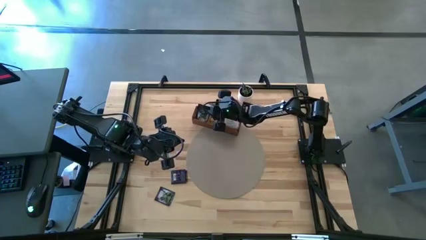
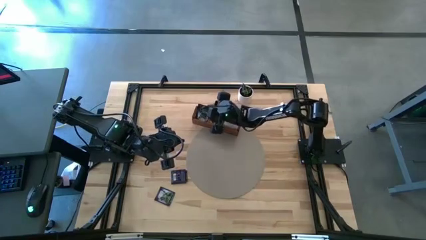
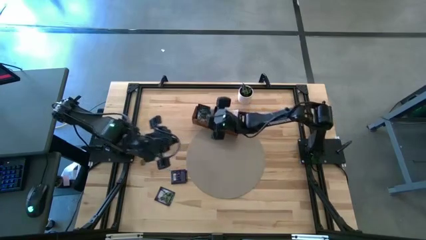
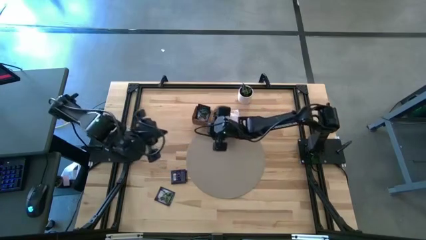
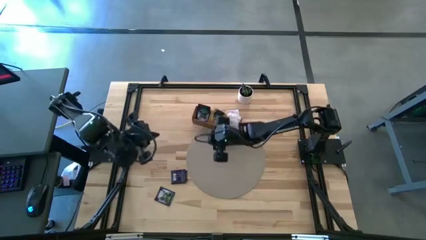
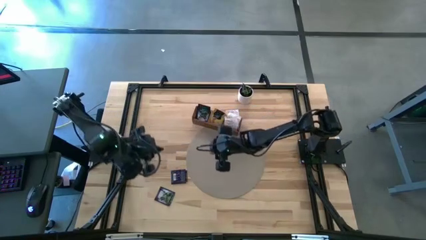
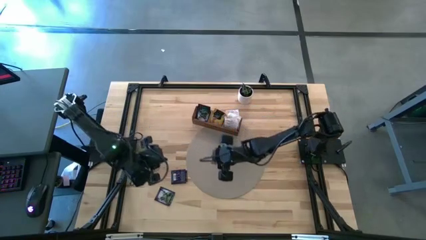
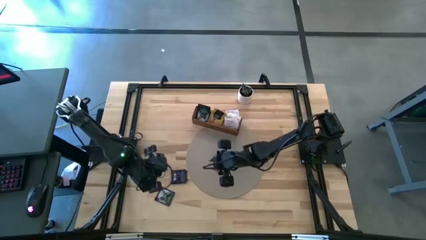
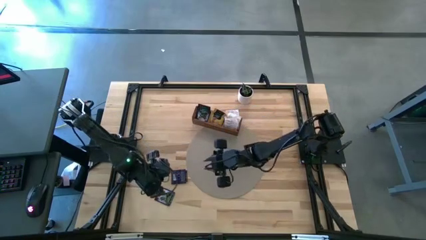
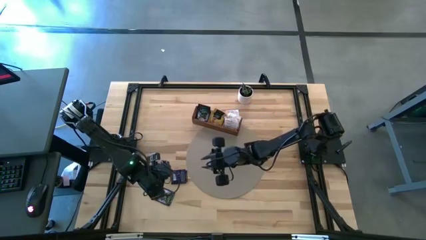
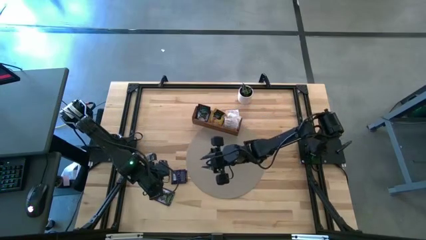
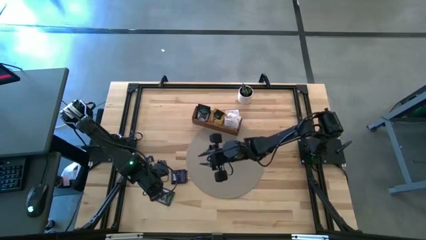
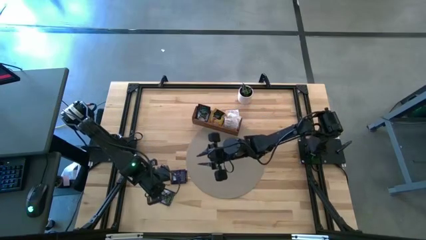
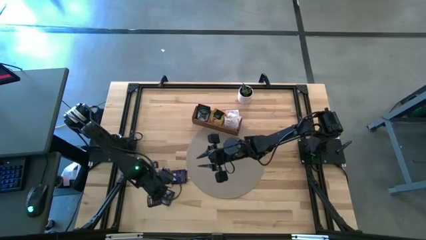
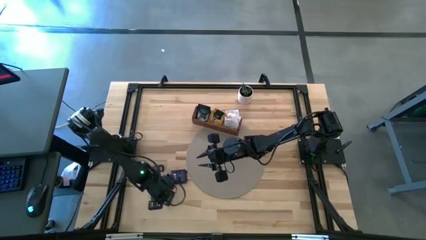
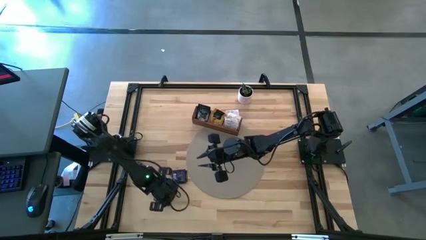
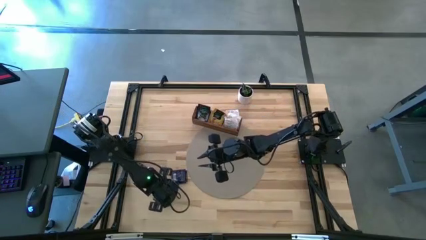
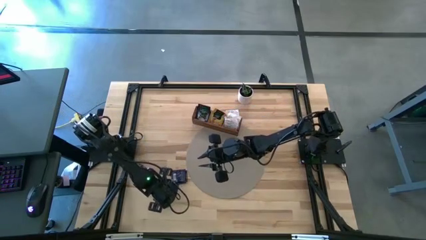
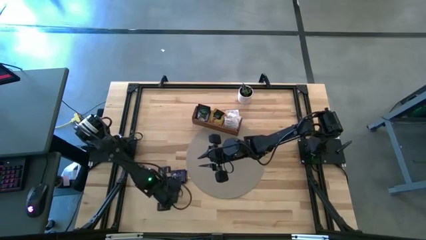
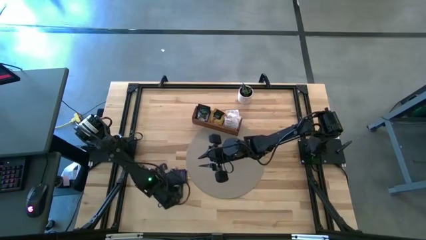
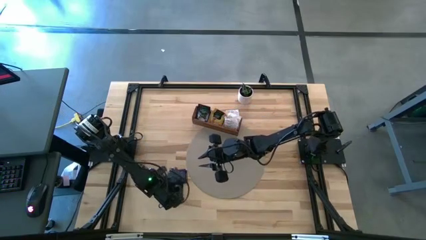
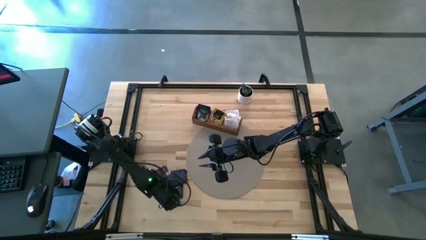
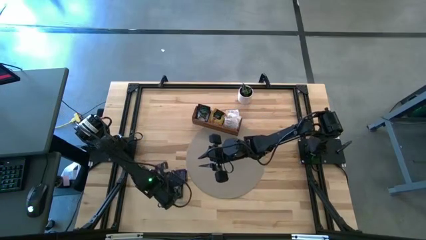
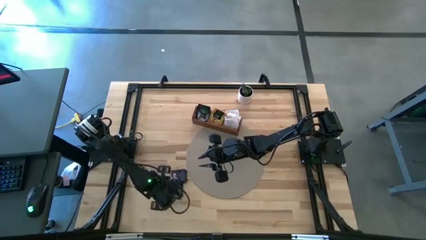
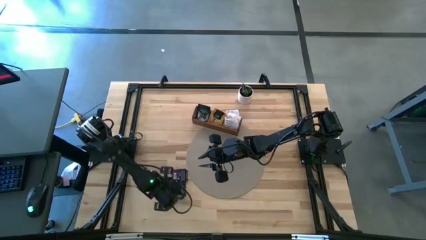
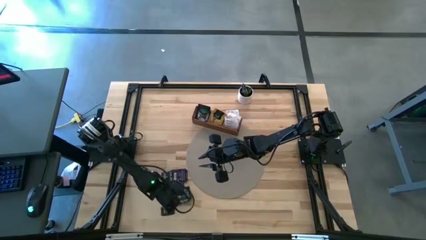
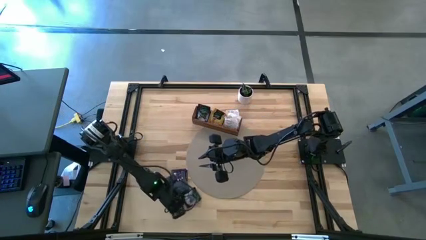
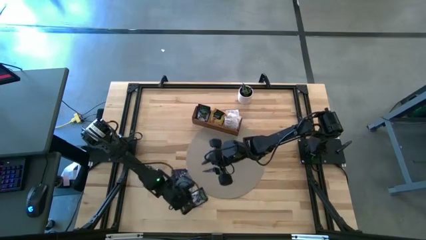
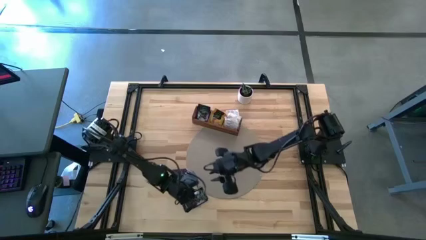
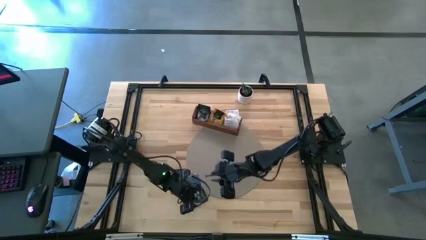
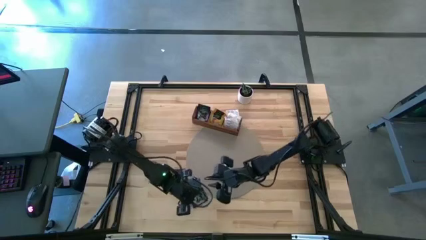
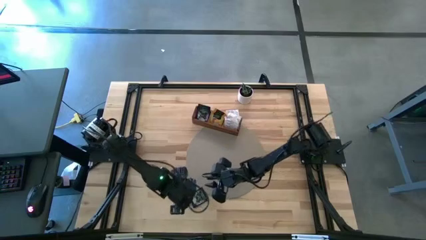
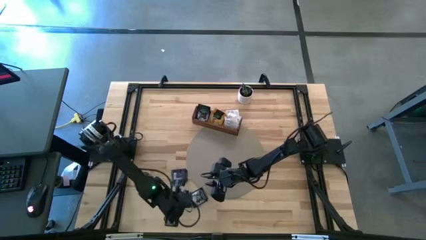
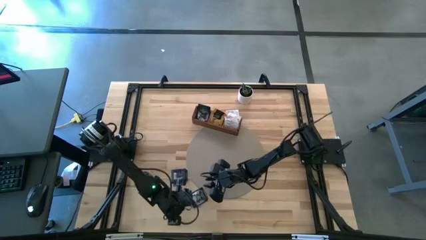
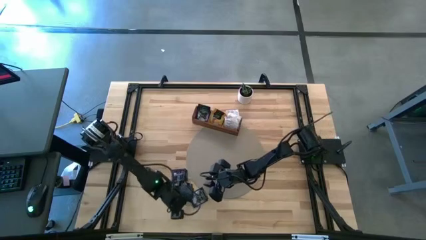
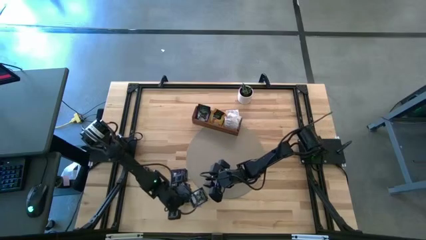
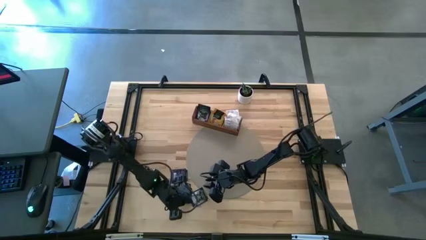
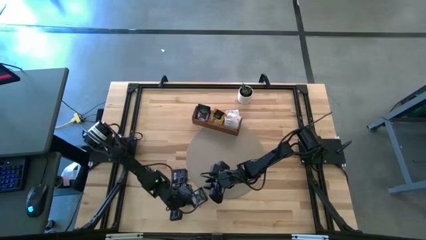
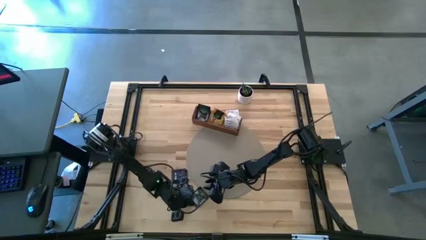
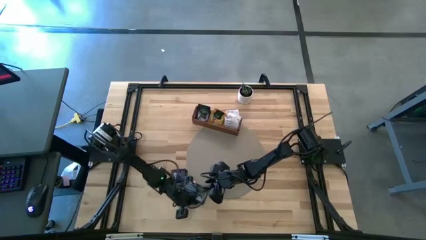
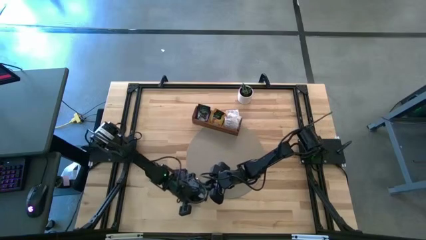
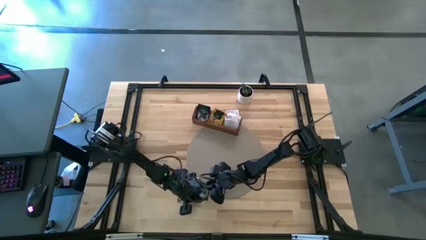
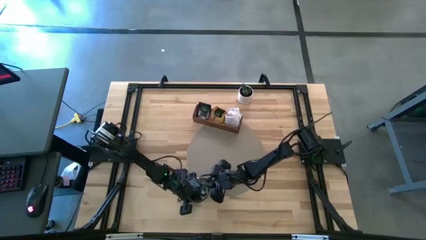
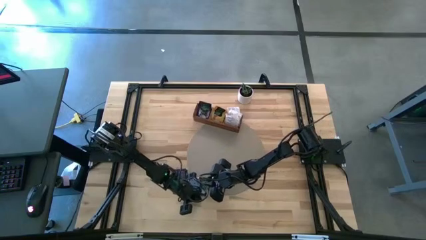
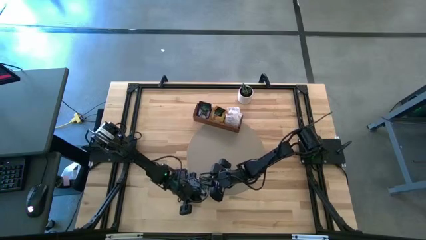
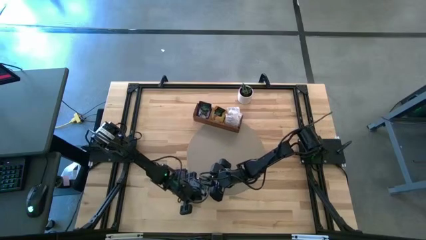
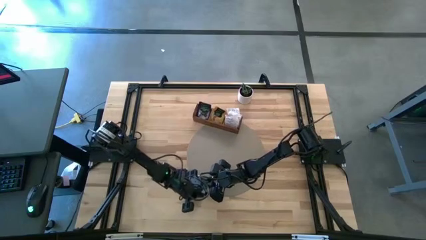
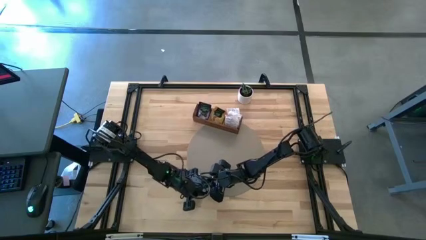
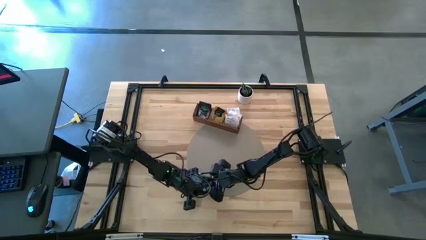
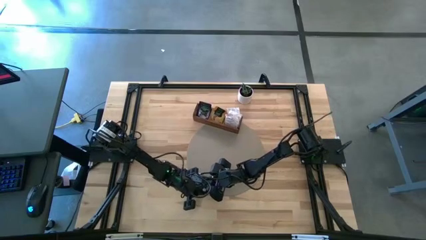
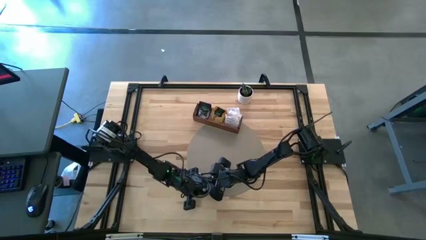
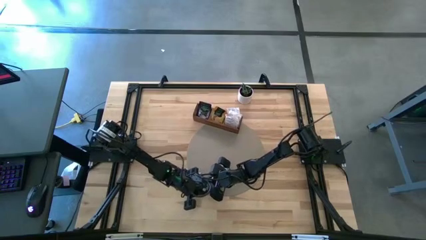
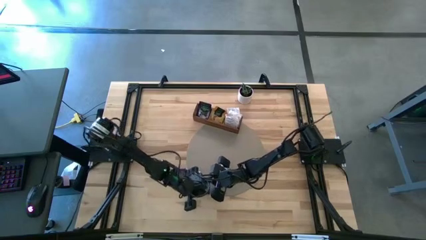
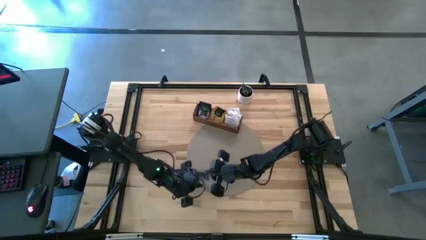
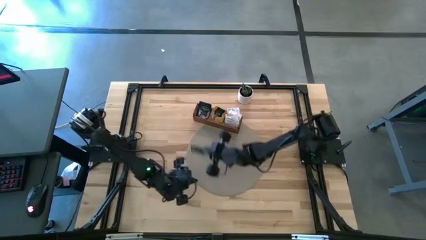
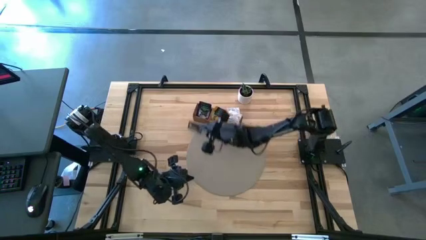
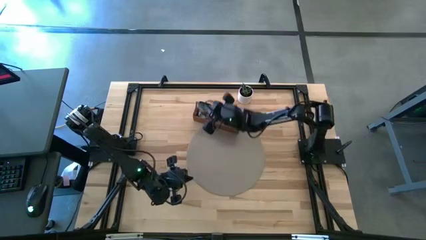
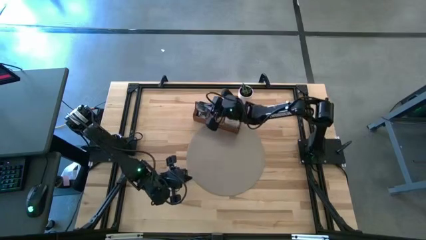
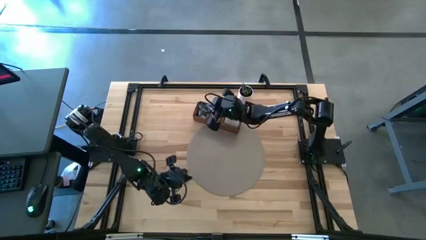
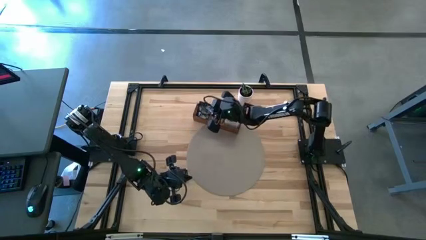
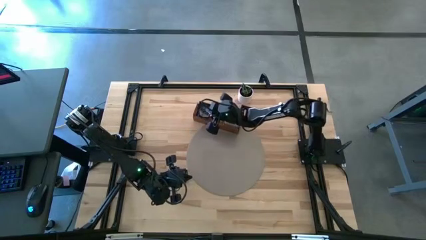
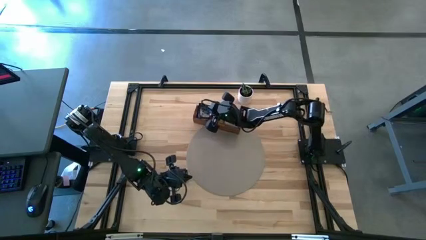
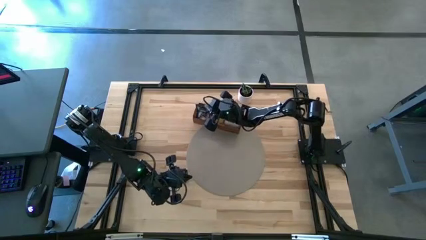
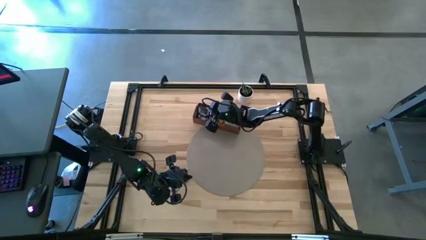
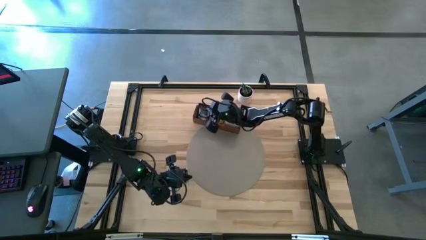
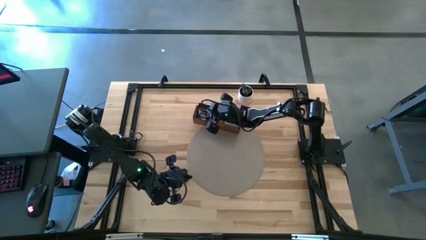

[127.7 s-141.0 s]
Task: Pick & Place Tea
Put the dark blue tea bag into the left section of the wooden organizer

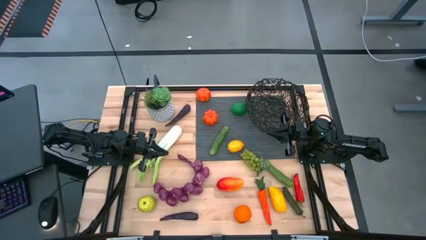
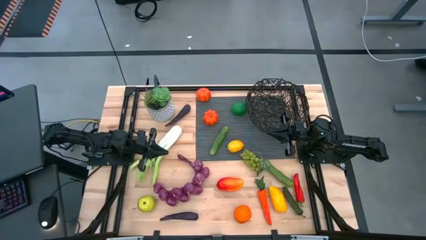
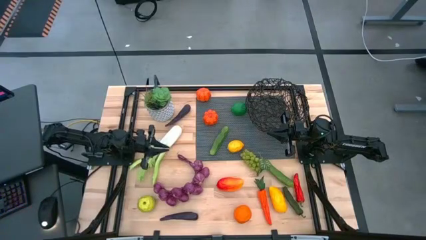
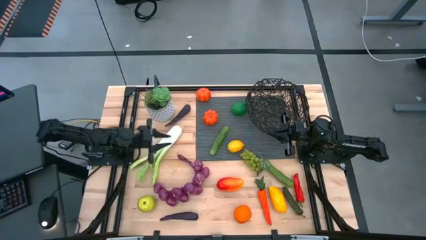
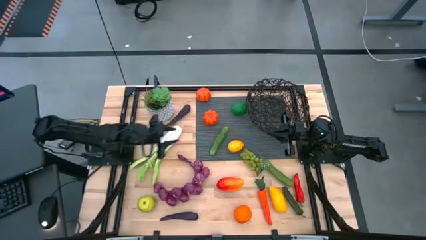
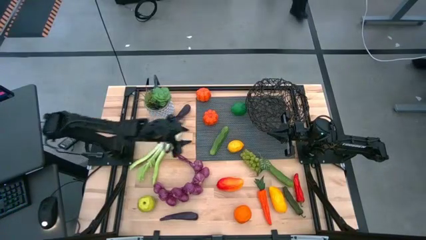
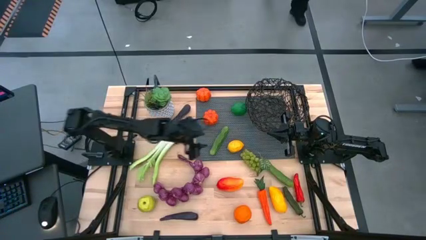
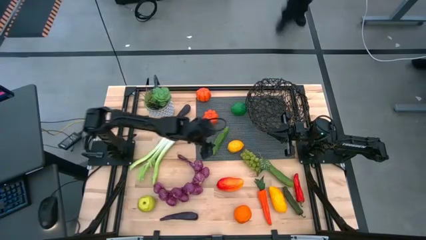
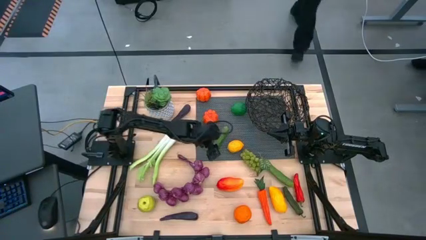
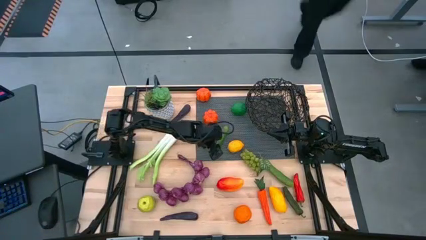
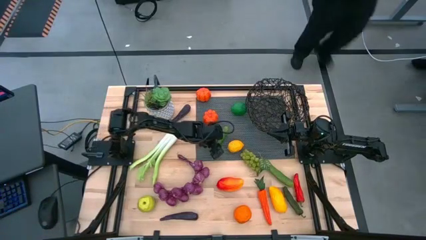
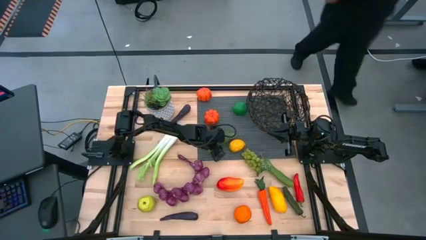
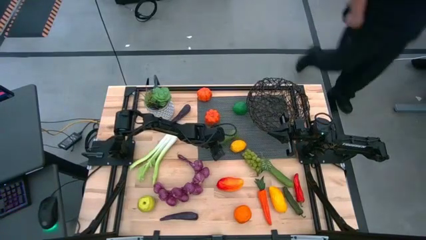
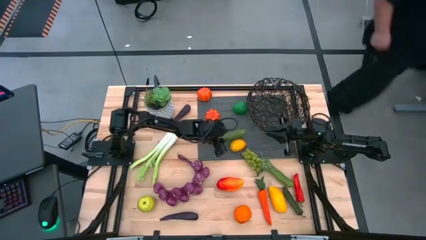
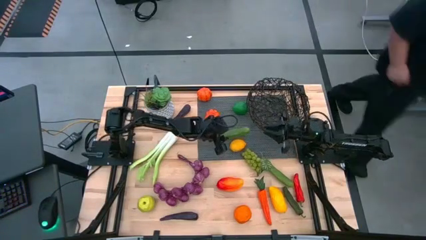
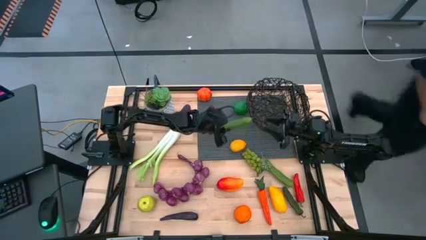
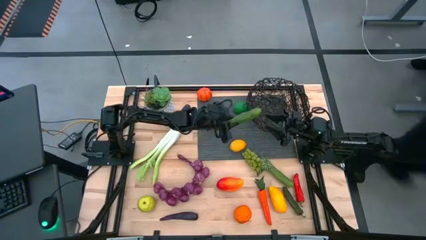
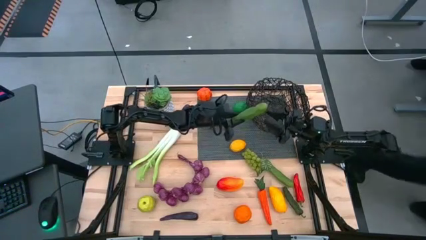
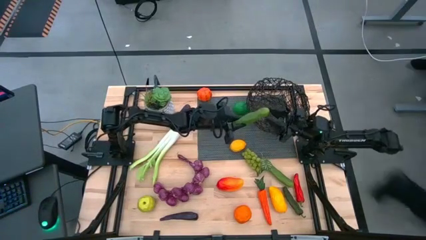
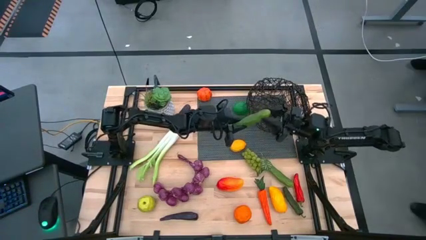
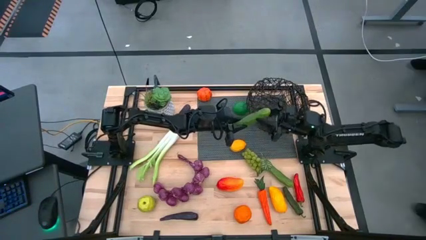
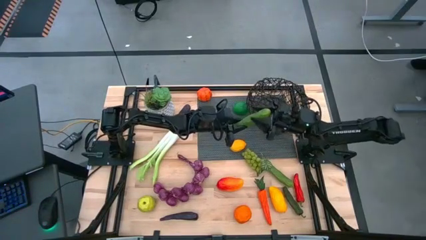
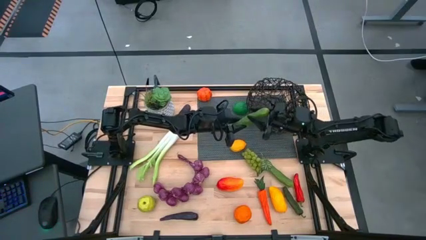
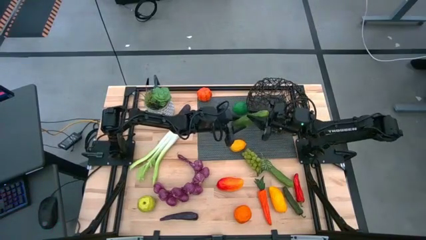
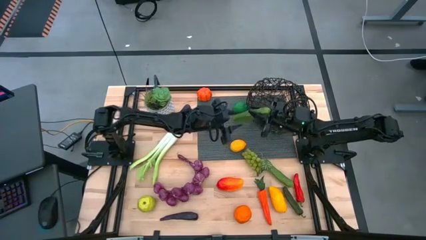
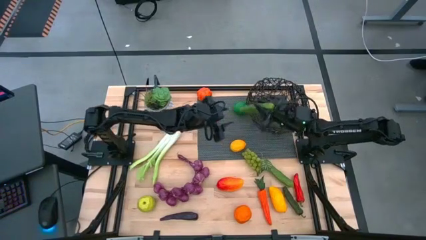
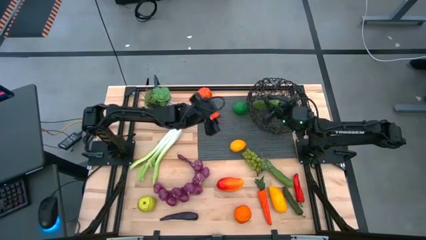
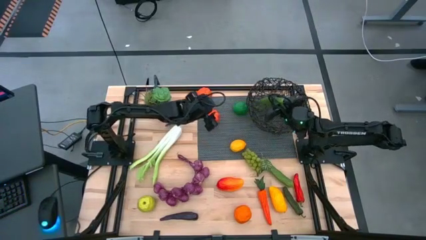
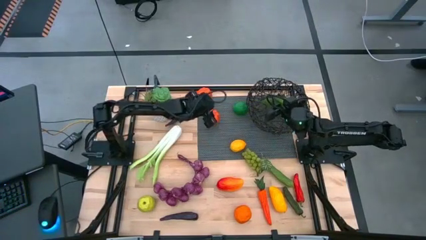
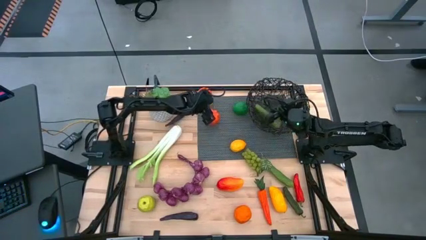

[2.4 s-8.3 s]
Task: Build produce basket
Put the left green cucumber into the black basket
